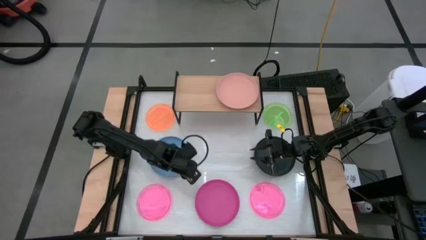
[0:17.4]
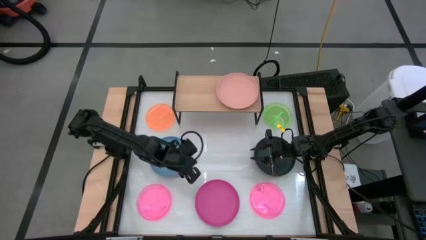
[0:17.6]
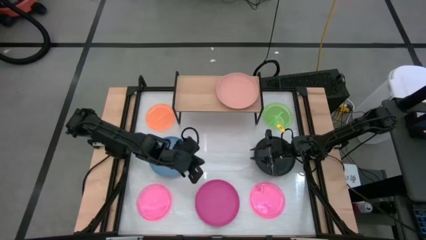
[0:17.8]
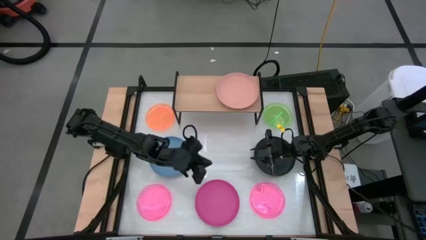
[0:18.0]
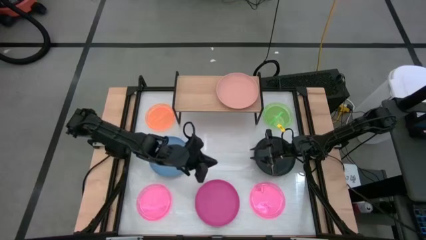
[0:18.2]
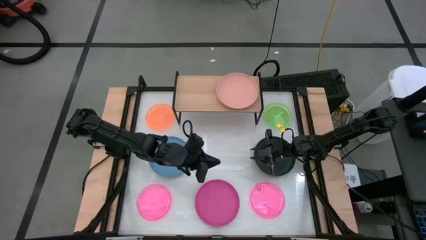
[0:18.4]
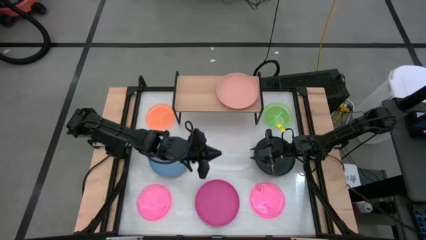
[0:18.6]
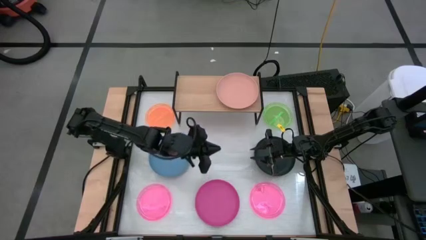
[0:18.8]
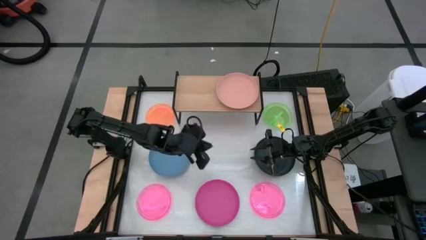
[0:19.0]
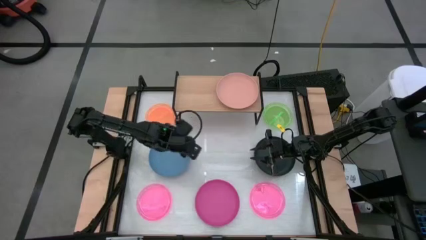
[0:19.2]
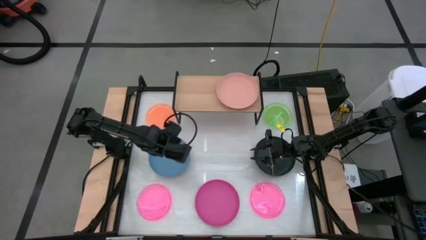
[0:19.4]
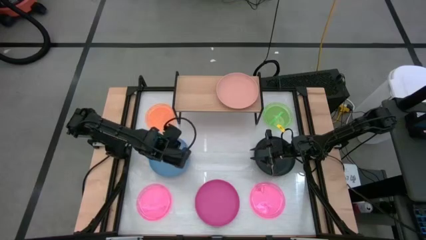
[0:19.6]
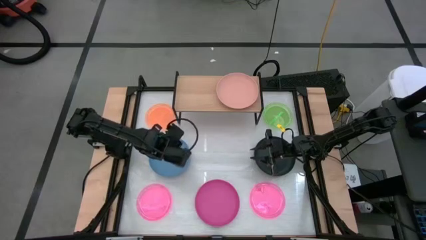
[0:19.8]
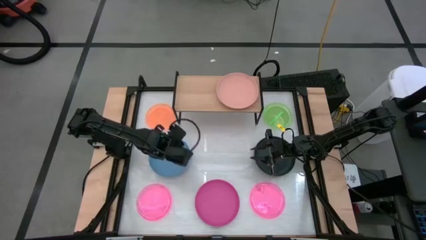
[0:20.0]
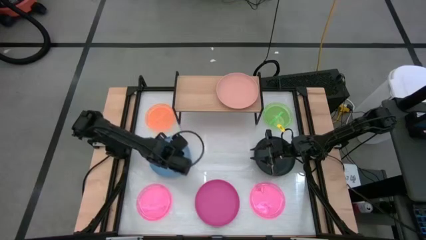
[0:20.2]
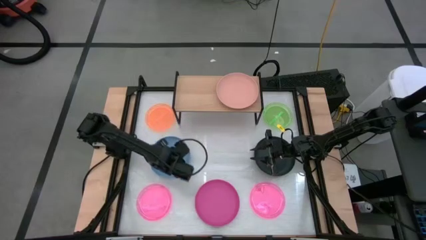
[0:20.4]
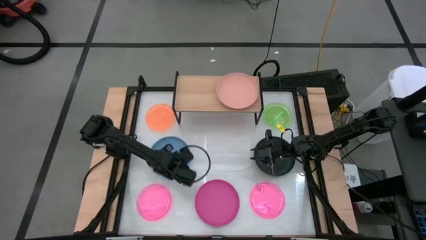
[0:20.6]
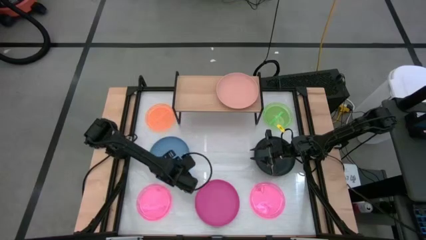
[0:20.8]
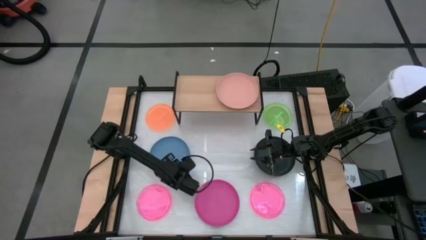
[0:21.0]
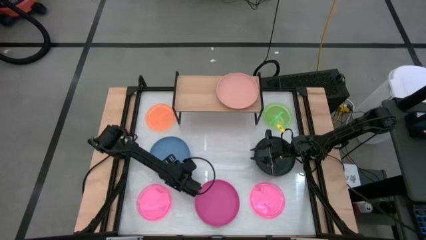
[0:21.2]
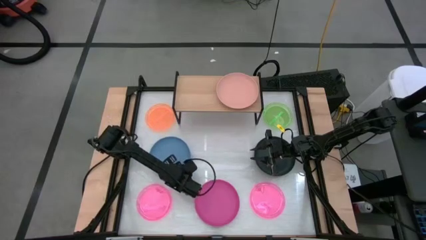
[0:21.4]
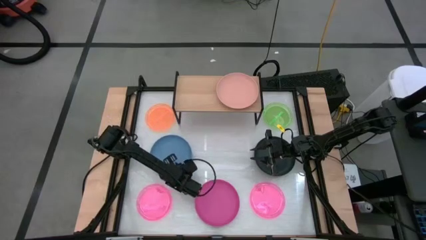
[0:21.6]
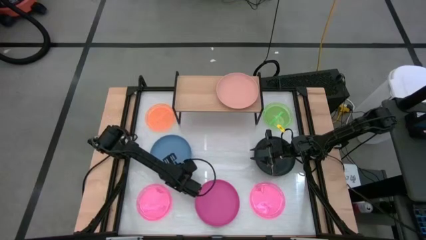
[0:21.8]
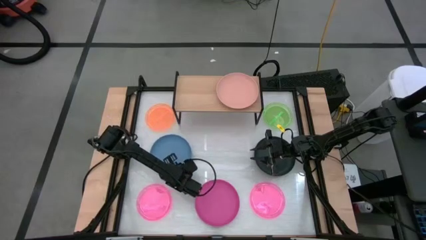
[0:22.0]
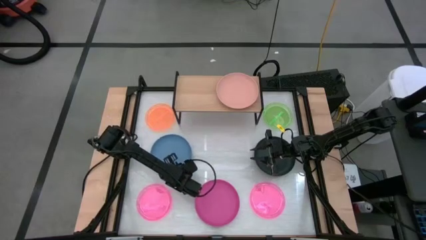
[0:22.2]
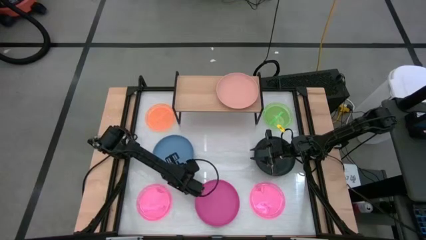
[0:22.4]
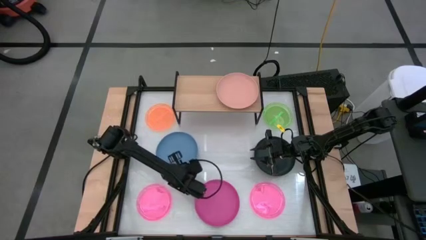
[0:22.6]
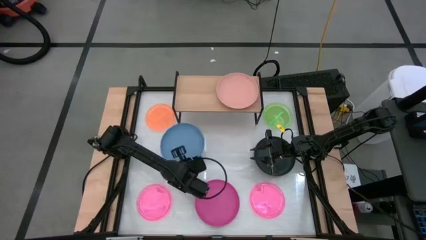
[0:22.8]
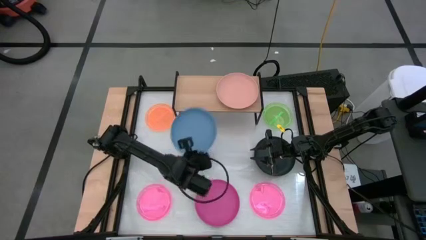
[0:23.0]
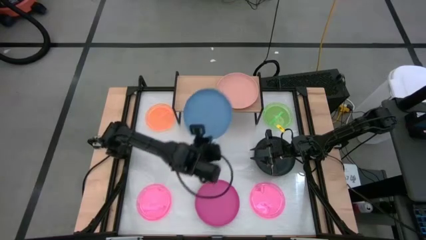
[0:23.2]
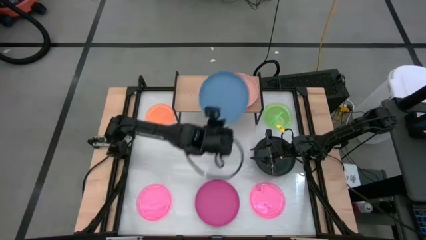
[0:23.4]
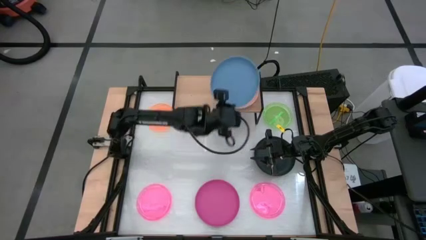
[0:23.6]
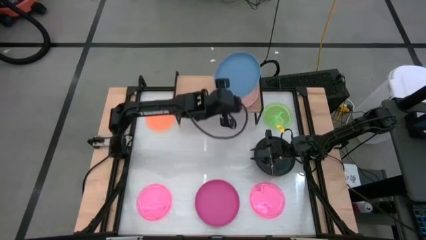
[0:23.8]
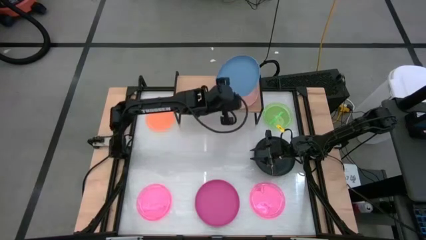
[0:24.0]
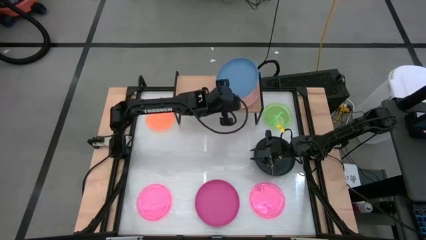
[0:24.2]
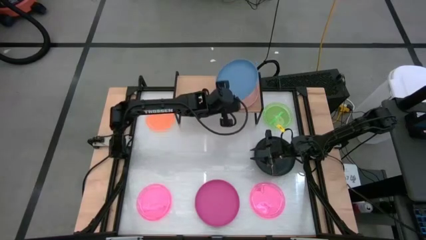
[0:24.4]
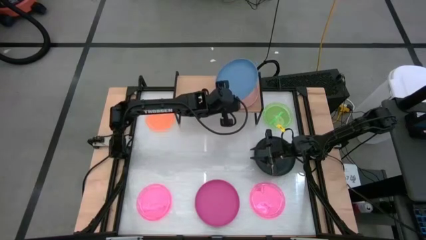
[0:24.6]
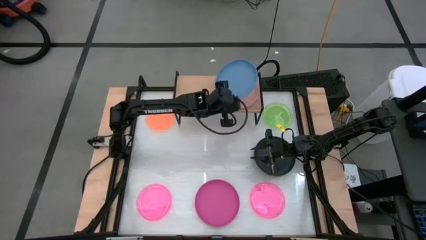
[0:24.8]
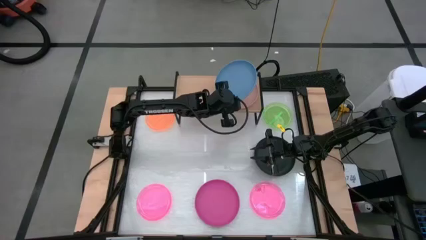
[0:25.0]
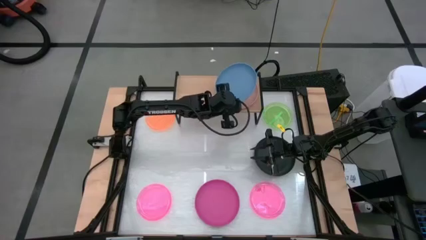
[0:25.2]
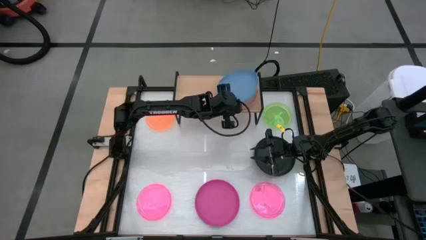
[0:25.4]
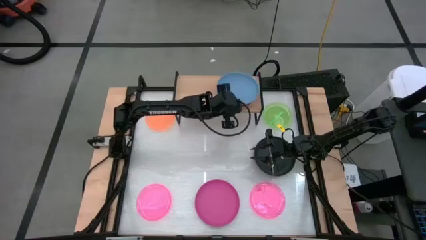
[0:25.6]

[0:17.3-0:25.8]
Task: Place and stack plates onto a shelf
Stack the large blue plate on top of the large light pink plate on the shelf

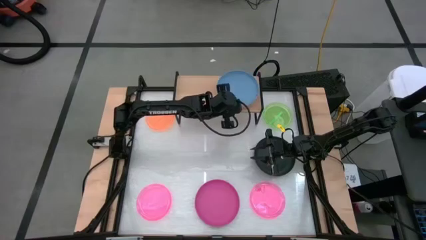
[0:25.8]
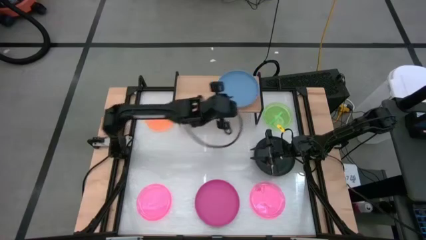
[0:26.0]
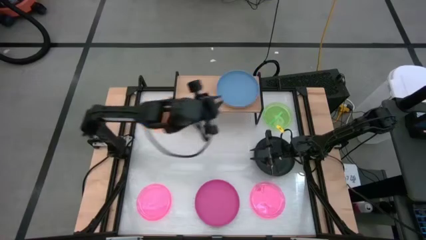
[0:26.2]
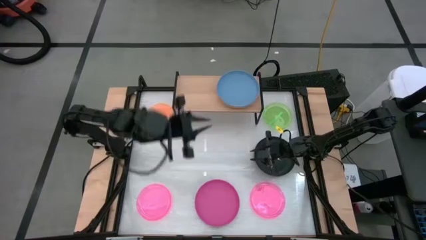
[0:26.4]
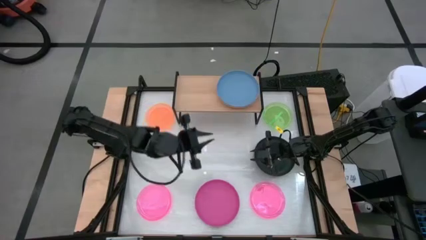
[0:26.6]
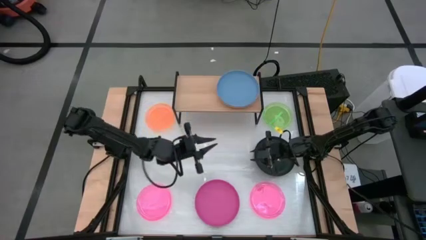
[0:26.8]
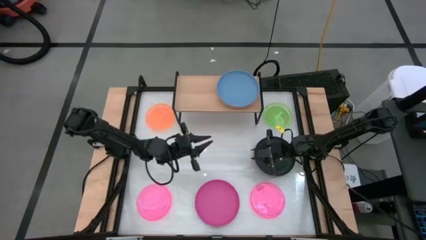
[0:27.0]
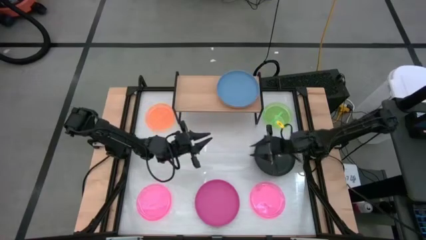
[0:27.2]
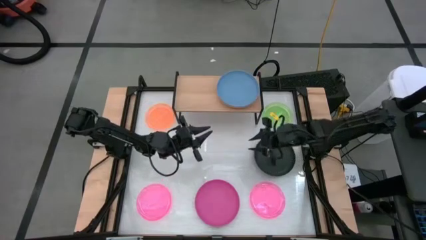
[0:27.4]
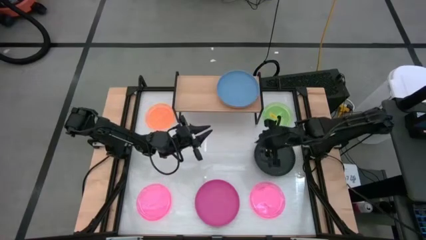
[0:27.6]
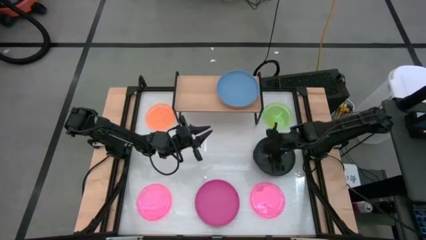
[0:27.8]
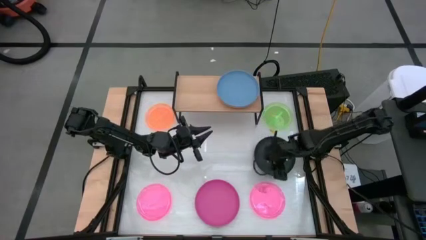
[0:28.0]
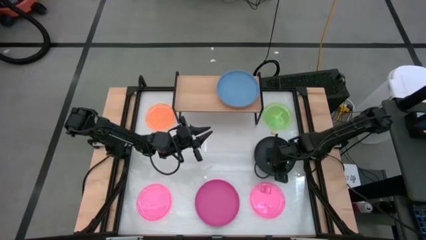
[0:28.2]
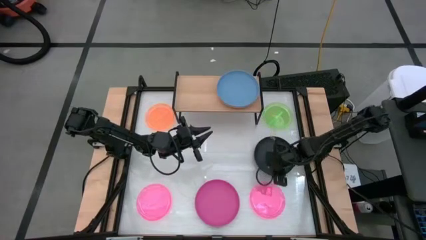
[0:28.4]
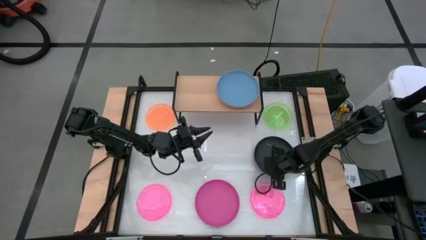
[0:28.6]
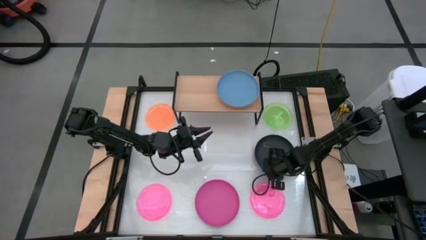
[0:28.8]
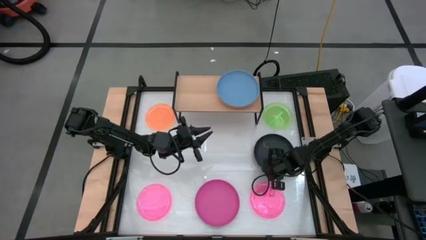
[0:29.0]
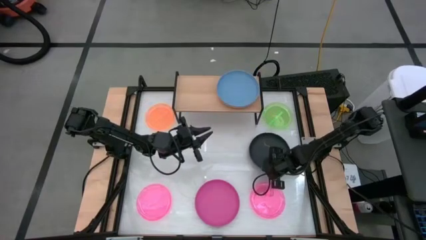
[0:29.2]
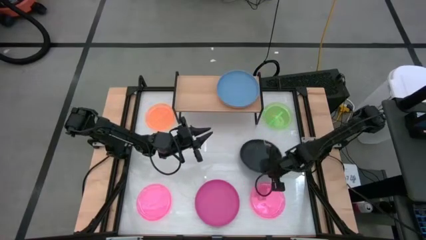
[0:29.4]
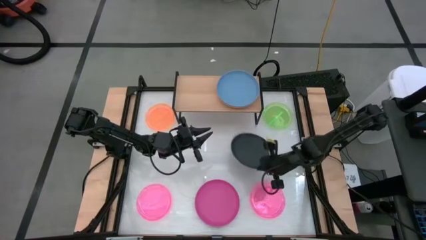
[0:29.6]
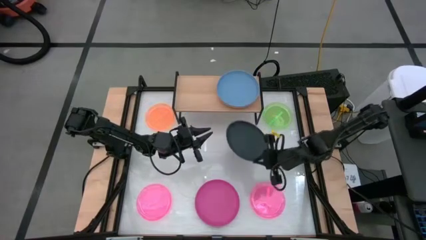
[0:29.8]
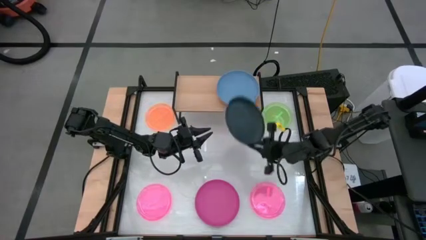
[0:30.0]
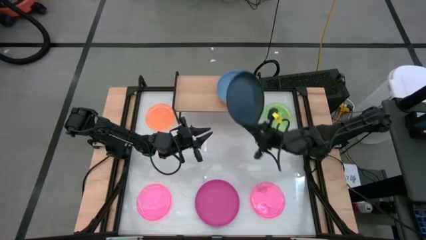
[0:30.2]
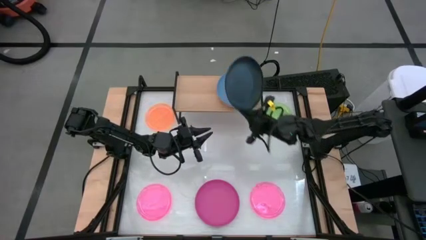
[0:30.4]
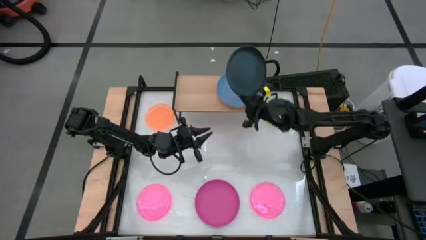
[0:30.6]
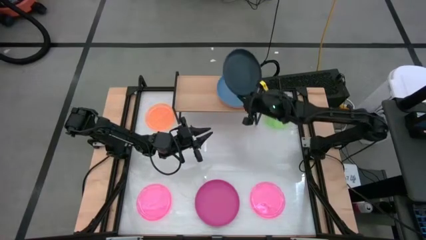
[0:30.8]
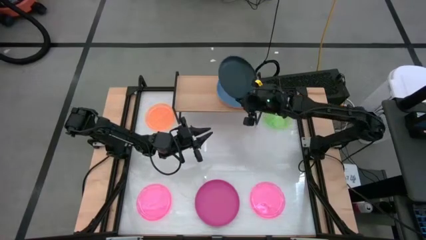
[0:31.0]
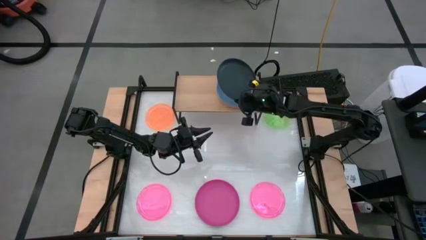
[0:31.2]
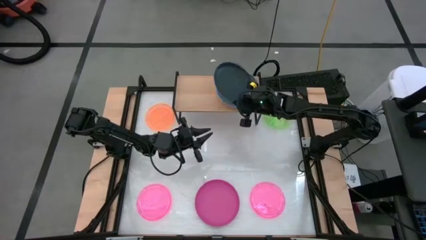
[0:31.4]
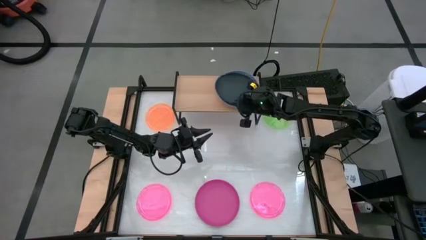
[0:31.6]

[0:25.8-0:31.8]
Stack the large black plate on top of the large blue plate on the shelf

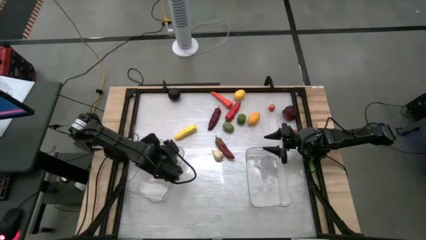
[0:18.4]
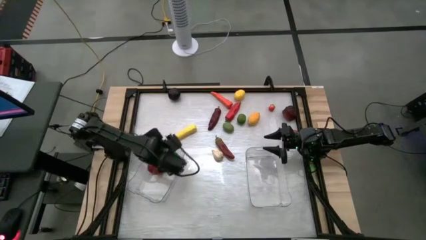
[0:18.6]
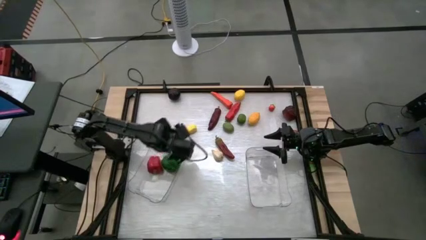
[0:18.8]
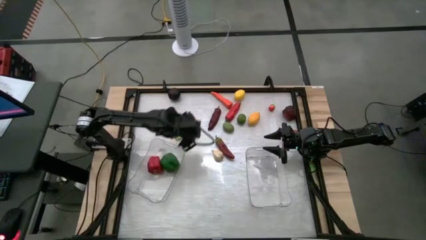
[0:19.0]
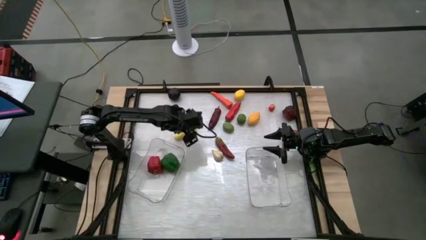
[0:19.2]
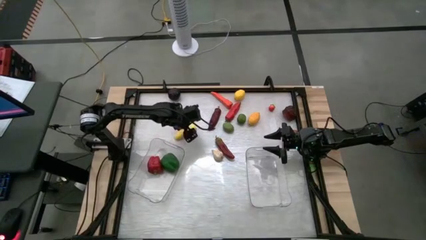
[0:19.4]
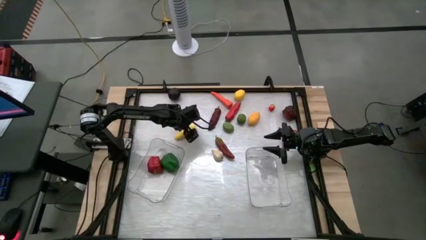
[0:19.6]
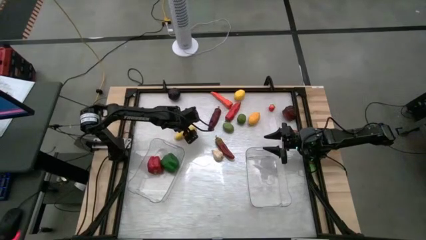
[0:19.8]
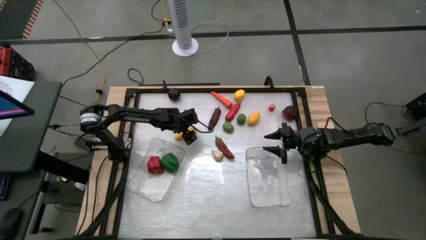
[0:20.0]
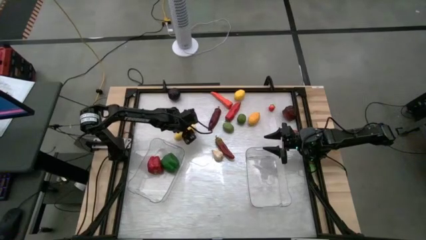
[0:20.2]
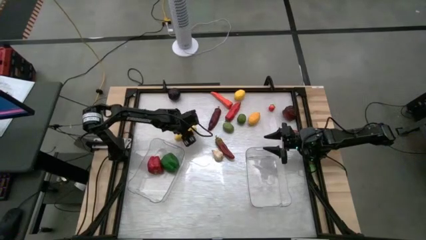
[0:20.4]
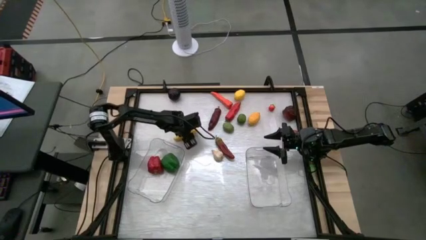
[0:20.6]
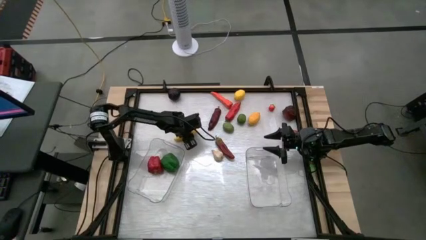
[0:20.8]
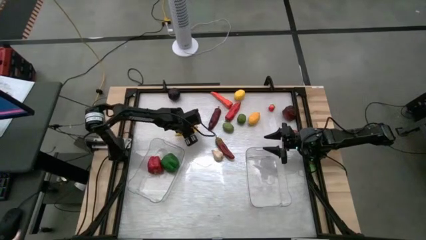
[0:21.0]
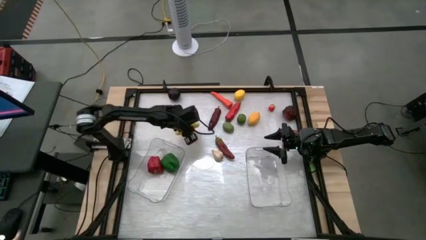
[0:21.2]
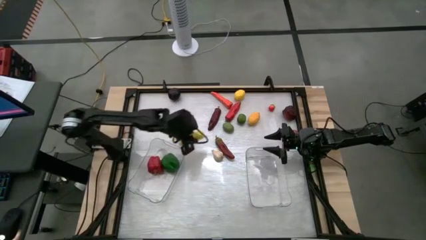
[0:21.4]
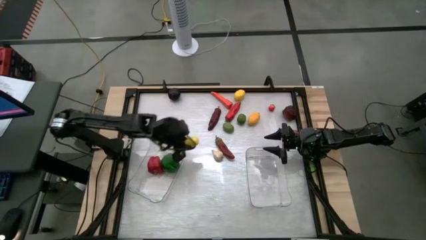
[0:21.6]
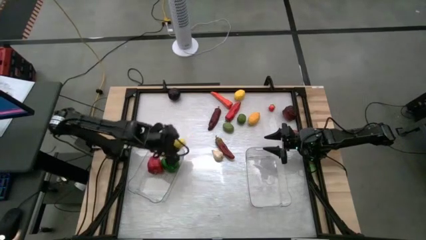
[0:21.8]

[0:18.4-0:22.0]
Task: Sort produce into baskets
Put the yellow corn into the left transparent bin
